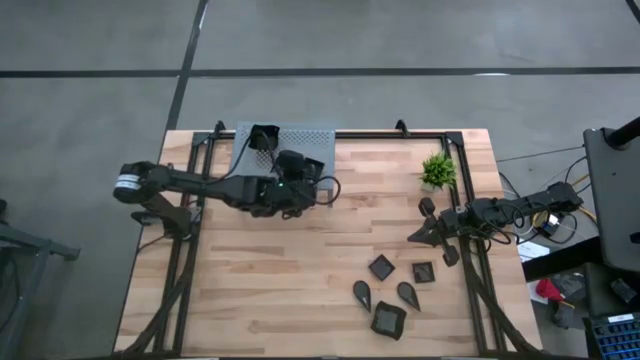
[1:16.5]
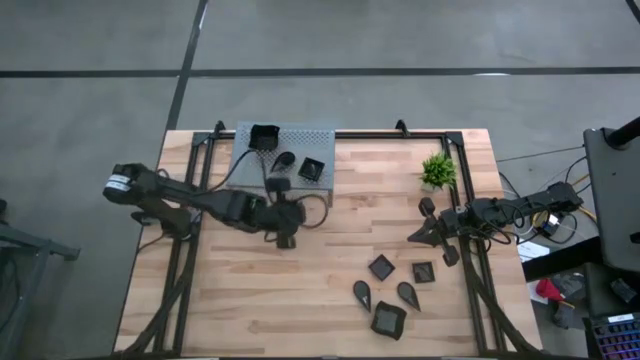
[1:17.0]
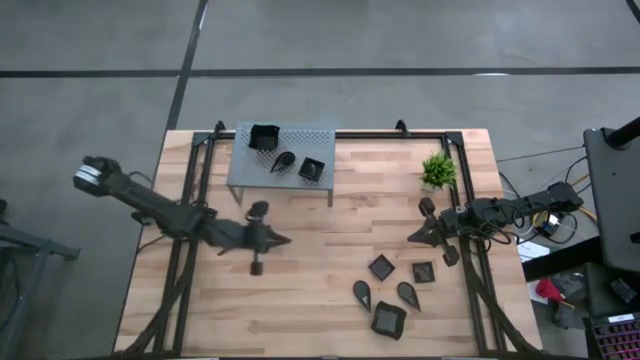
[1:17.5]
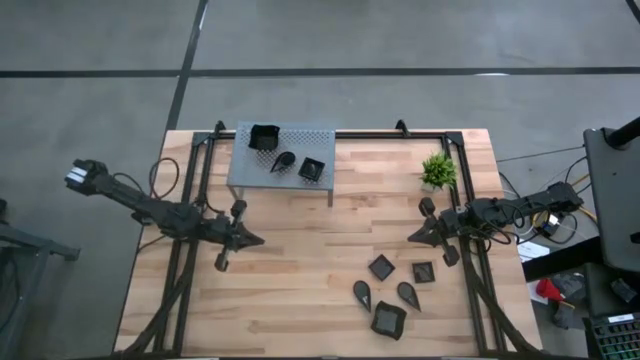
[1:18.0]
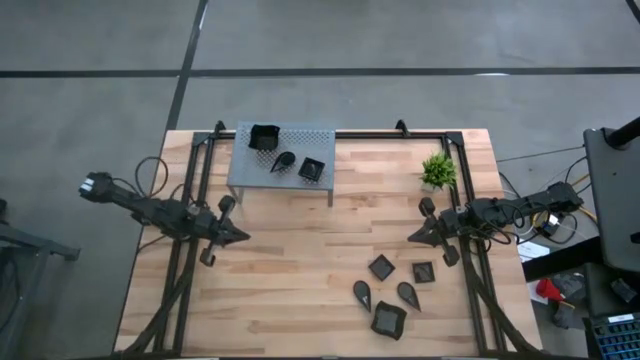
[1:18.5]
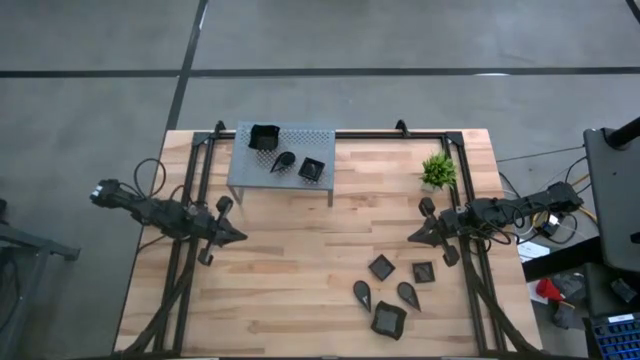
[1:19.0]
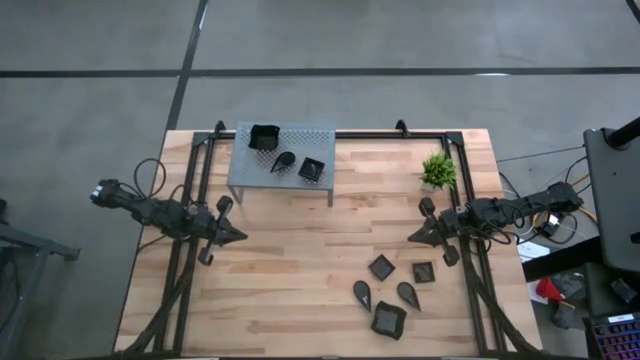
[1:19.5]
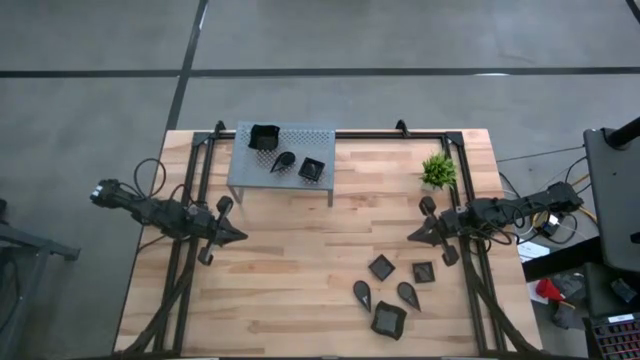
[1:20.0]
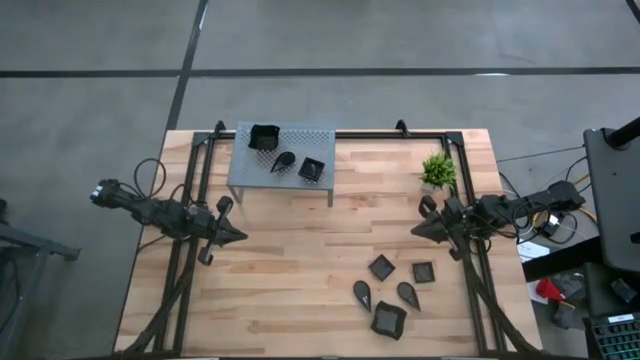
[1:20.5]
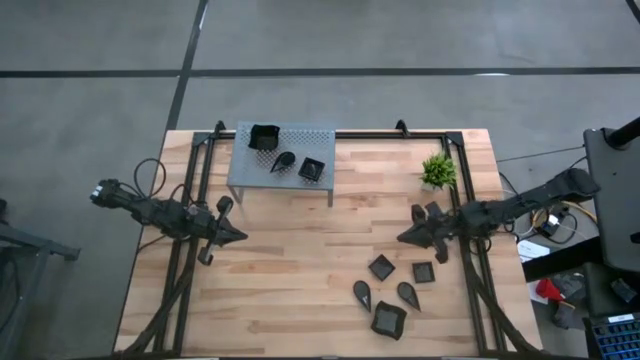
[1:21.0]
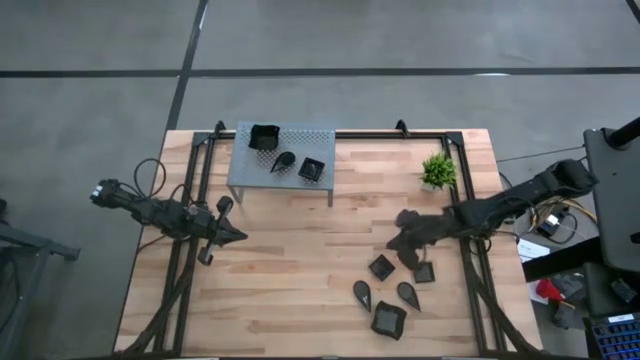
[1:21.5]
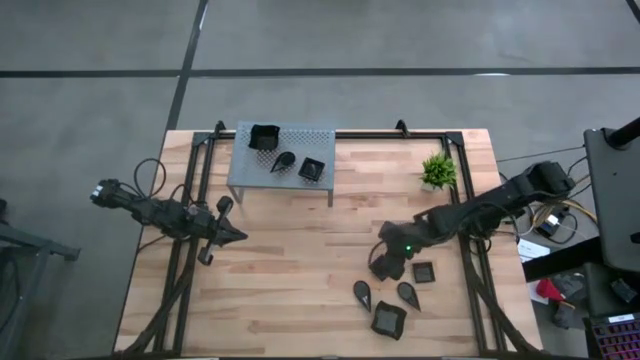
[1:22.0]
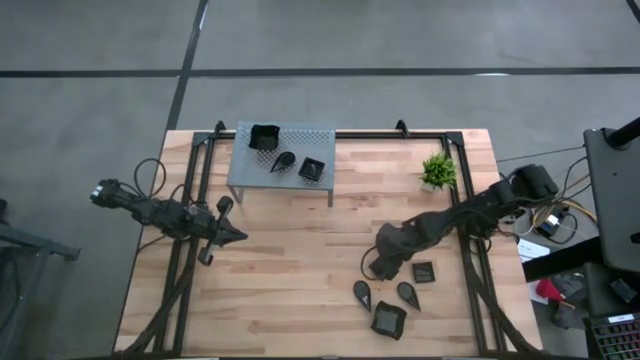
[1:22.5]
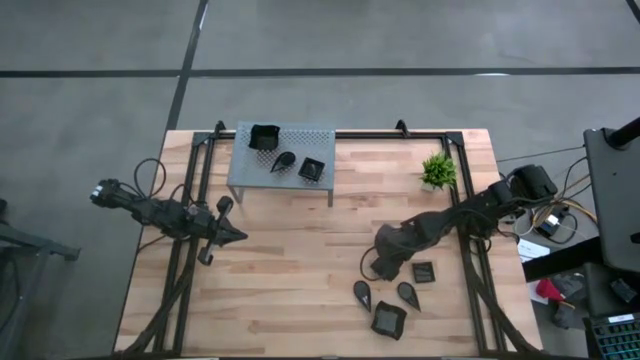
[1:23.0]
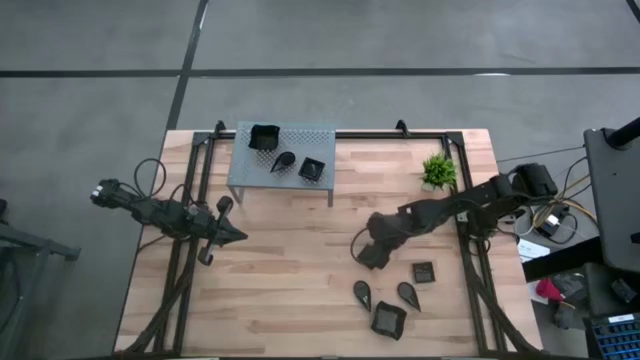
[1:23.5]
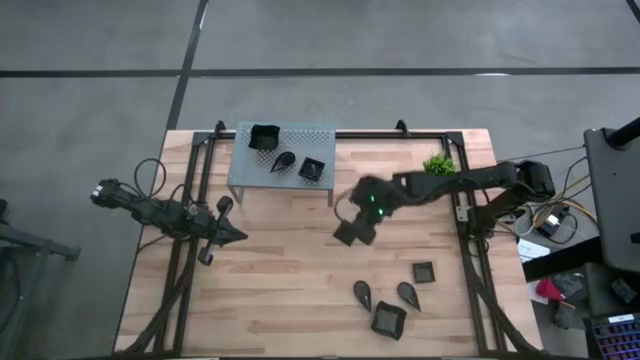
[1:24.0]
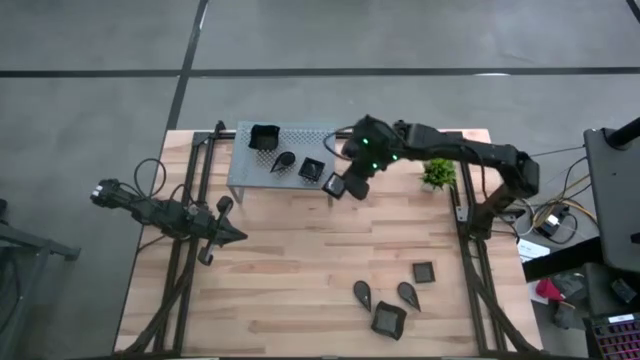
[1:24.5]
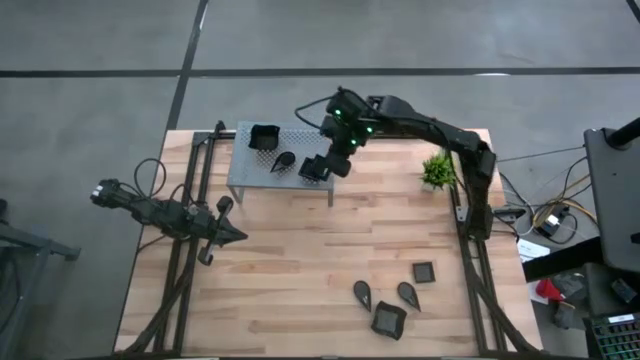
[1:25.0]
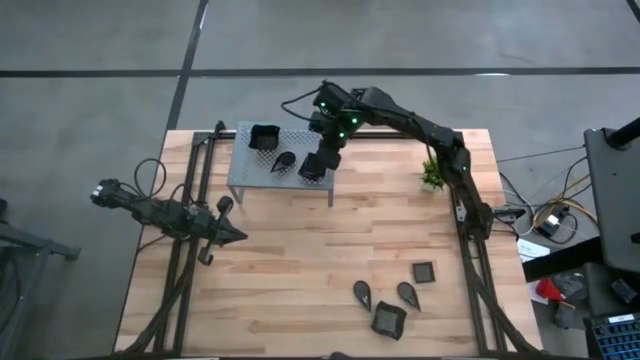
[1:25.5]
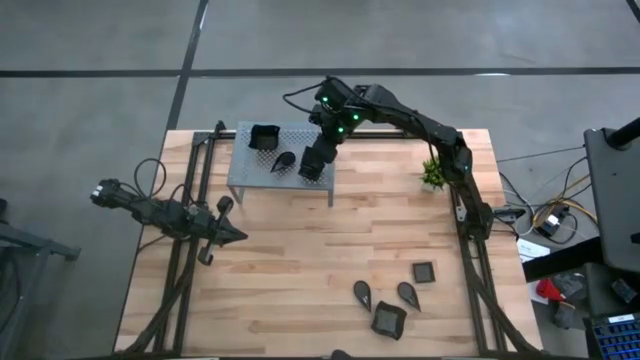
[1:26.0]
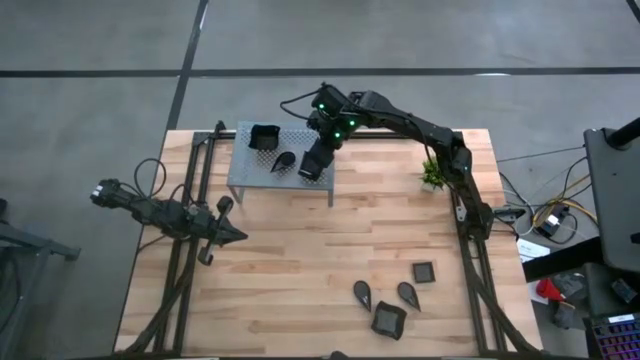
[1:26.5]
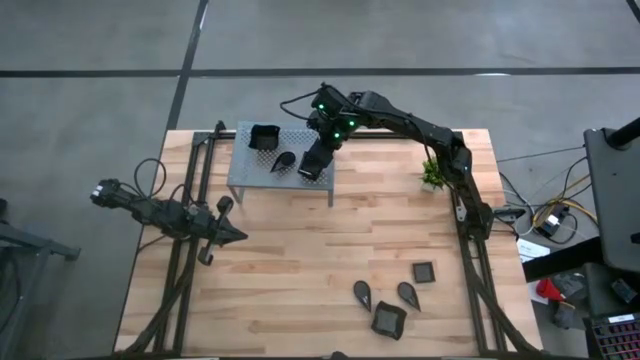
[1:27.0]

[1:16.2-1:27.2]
Task: Pick & Place Mini shaped plates
Stack the black square plate on top of the black square plate on the shelf

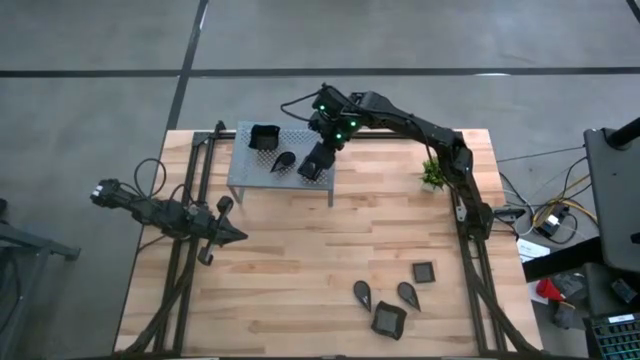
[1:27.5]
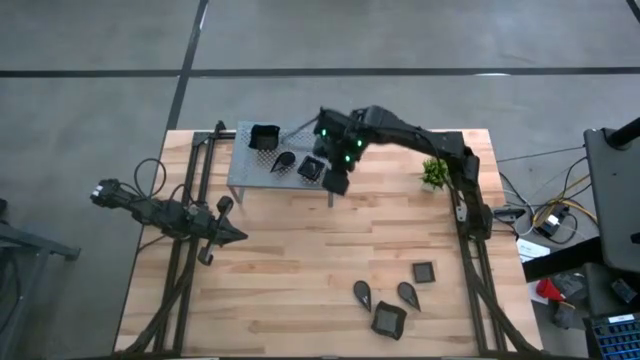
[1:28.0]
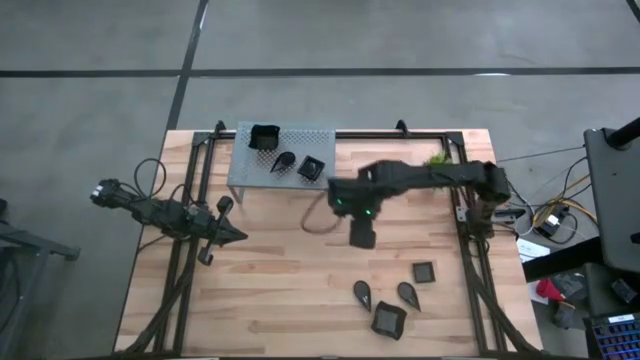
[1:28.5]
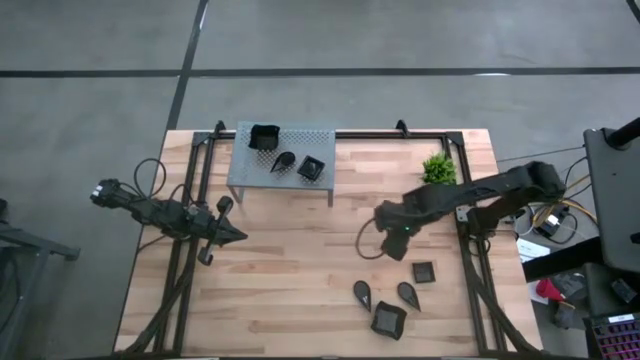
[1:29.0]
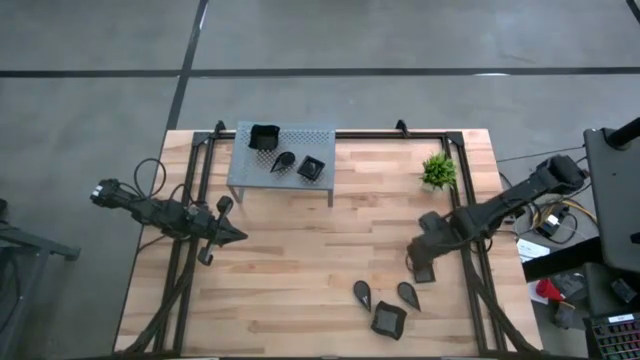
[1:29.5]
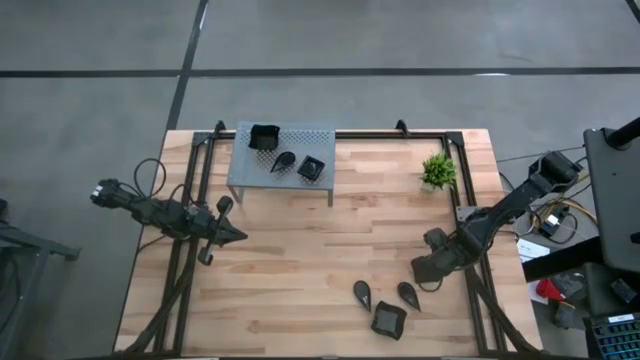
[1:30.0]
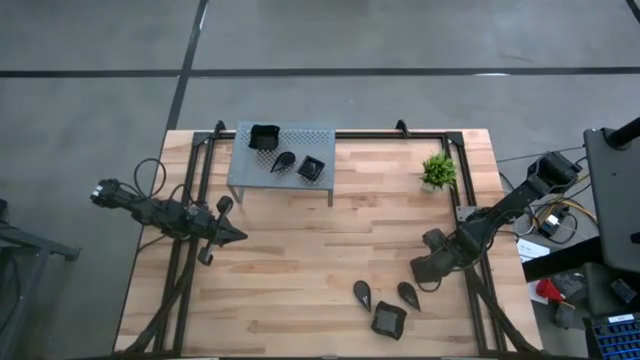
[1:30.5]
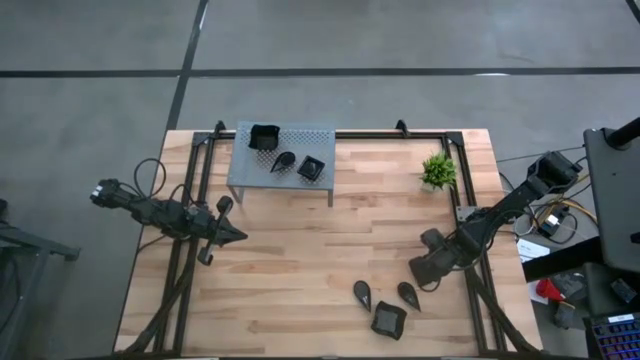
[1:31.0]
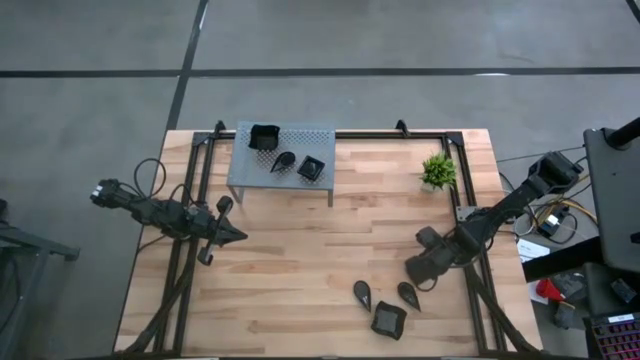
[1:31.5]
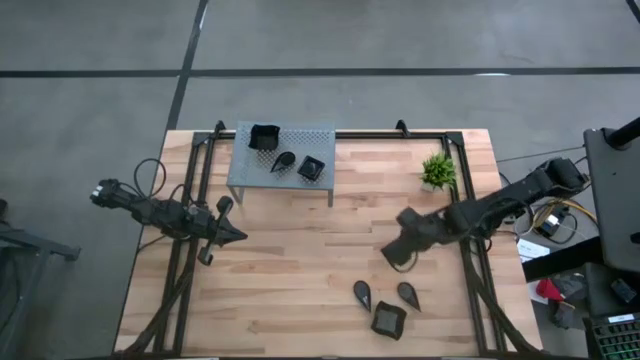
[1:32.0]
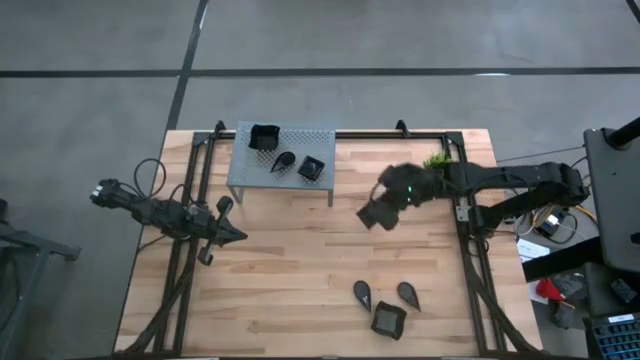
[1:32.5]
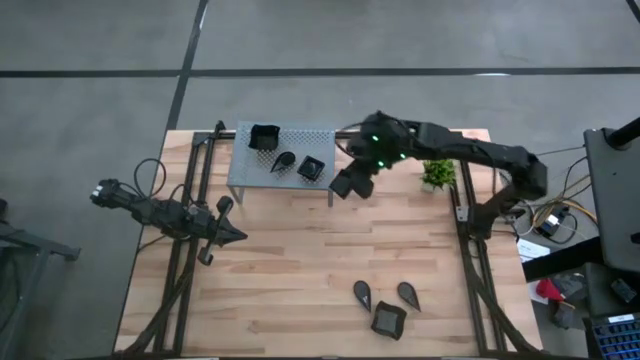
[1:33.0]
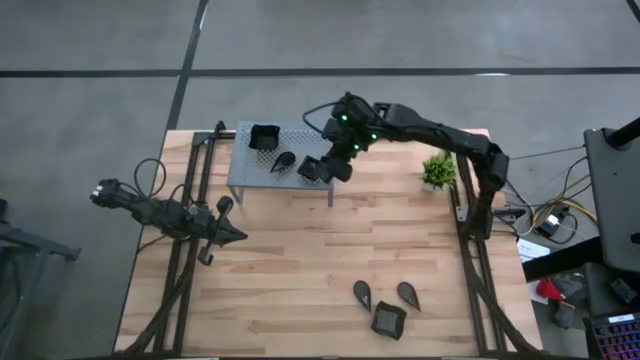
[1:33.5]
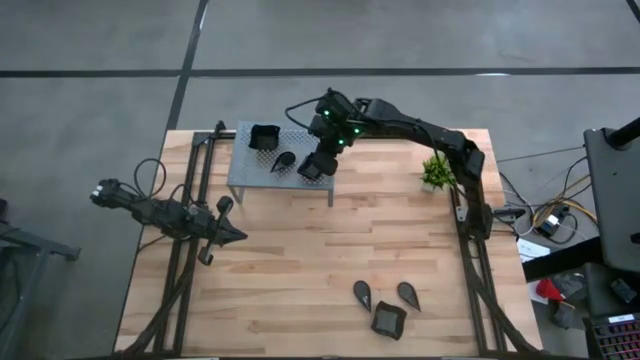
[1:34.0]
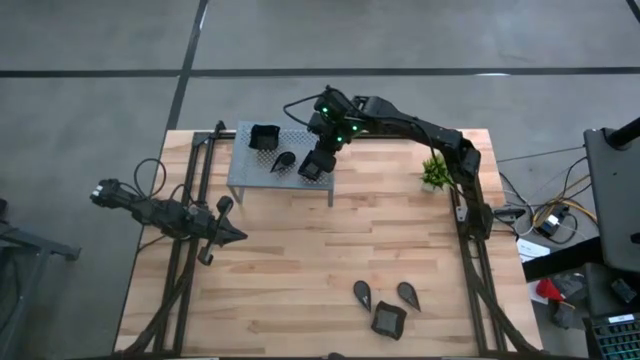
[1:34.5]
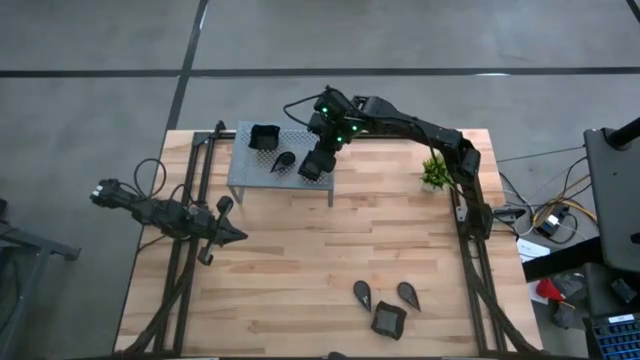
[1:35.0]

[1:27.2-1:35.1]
Stack the black square plate on top of the black square plate on the shelf
